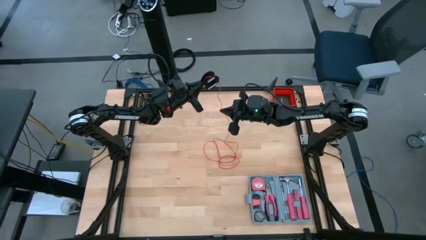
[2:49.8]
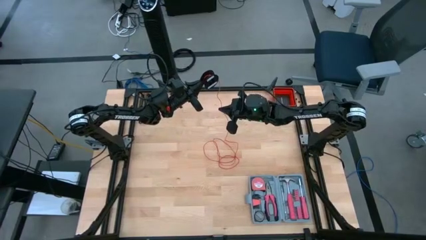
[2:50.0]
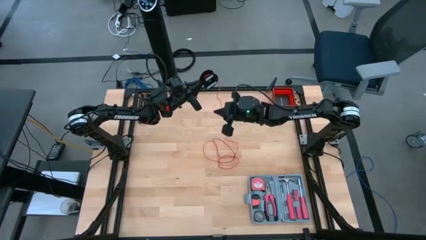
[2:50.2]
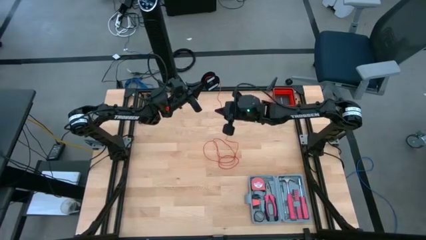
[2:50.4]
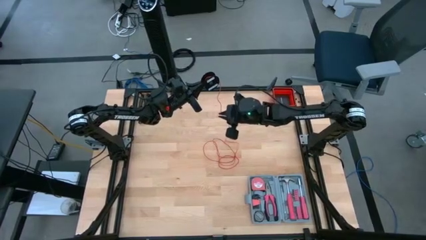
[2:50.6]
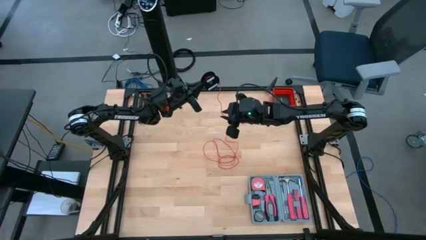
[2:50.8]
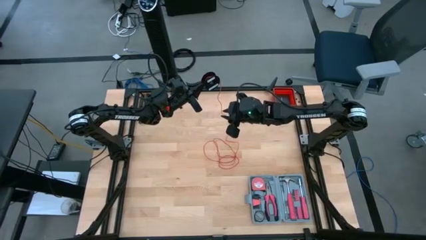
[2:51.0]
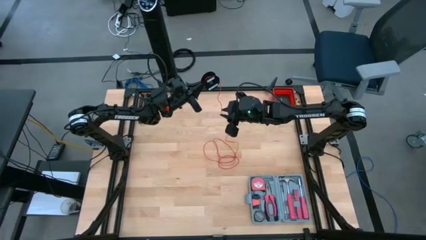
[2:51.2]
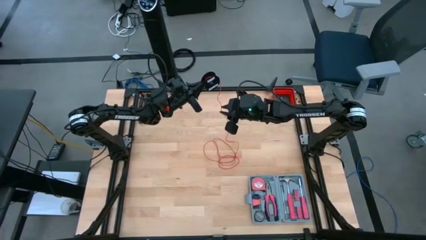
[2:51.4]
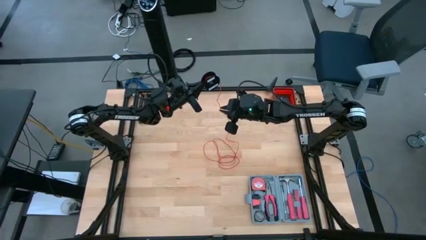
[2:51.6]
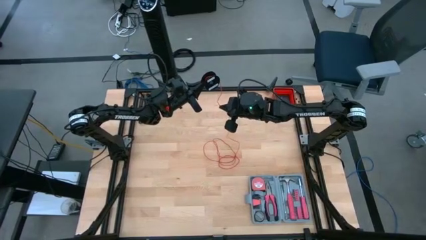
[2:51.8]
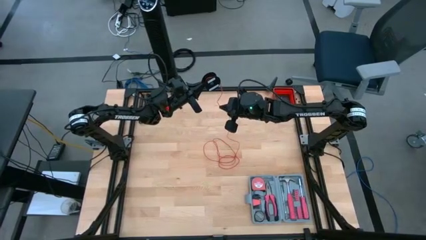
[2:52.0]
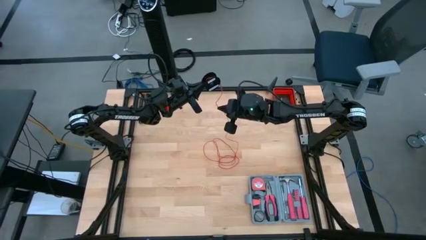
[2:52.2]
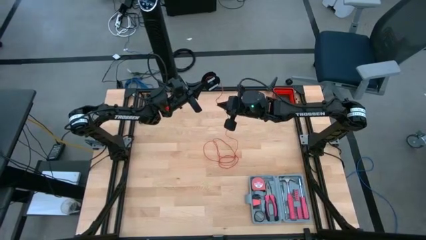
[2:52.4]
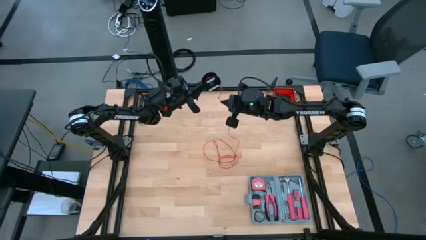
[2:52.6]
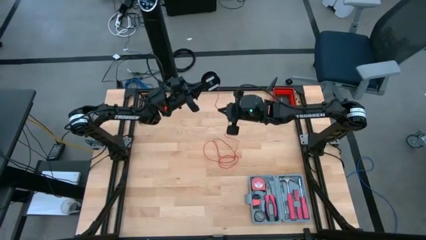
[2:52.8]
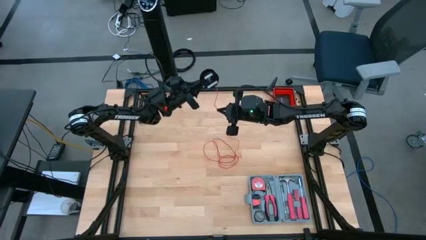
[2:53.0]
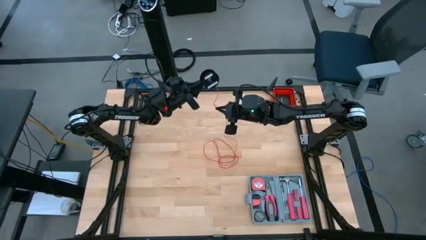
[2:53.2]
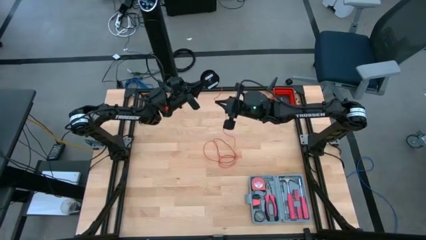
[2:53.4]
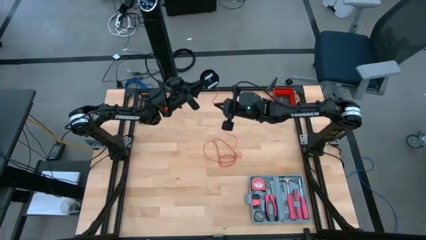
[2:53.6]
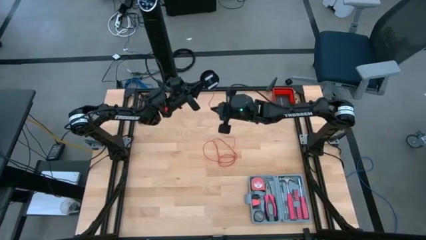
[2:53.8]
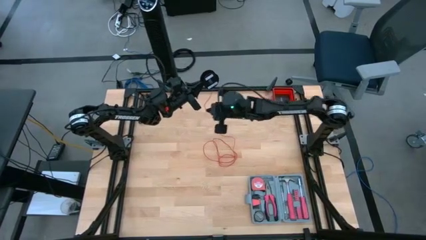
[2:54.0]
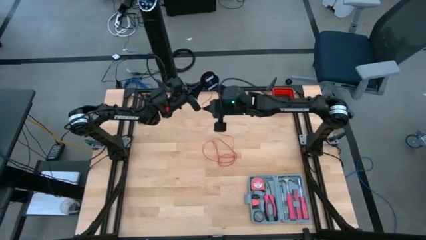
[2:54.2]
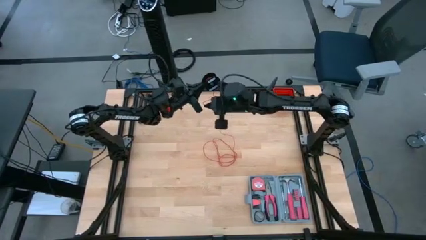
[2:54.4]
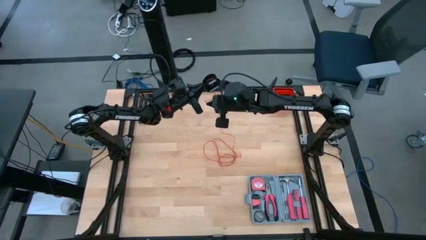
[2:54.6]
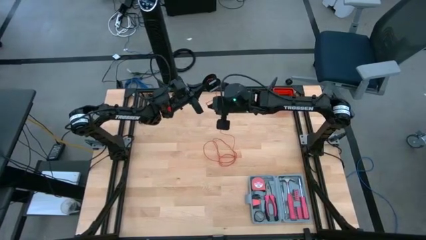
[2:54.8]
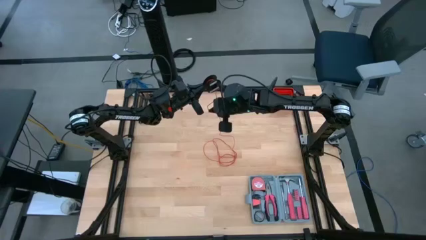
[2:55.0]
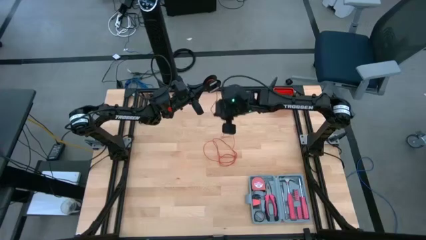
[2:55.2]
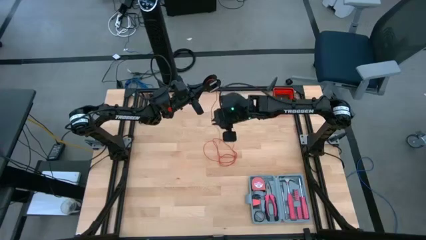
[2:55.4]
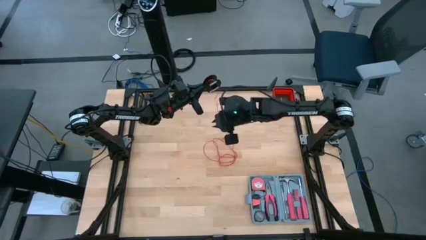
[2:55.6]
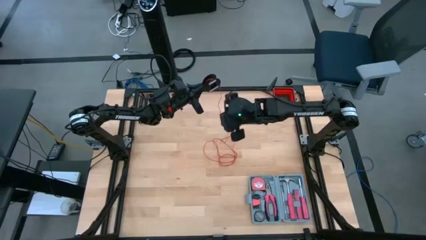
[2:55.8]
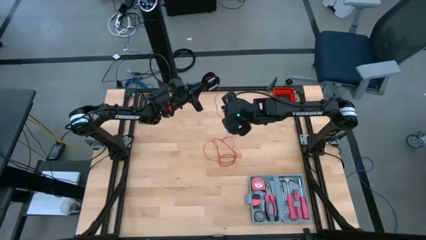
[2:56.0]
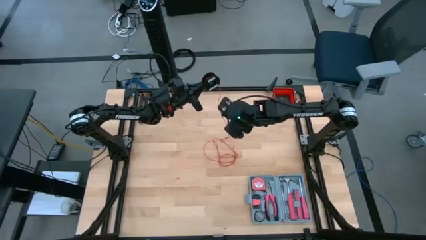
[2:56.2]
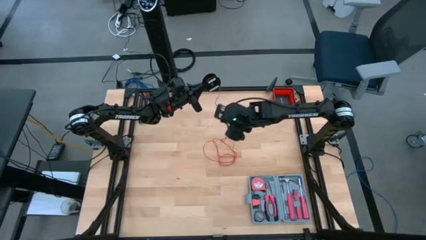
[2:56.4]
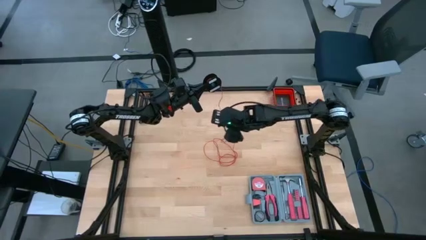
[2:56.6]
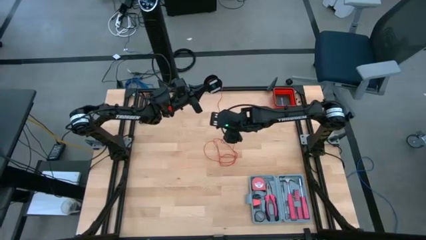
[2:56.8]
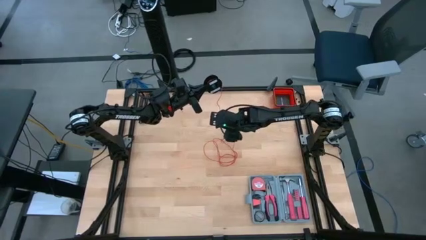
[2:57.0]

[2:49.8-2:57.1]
Task: Coil cords
Coil the wire

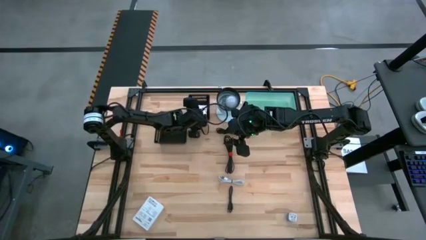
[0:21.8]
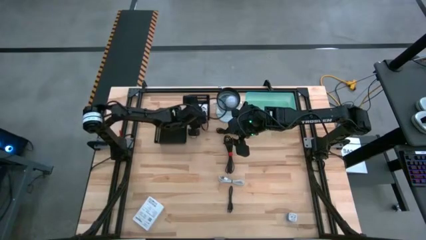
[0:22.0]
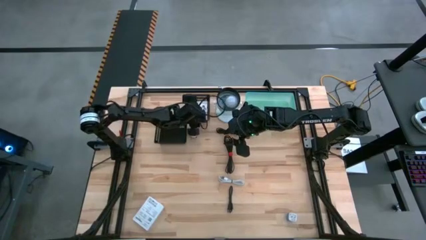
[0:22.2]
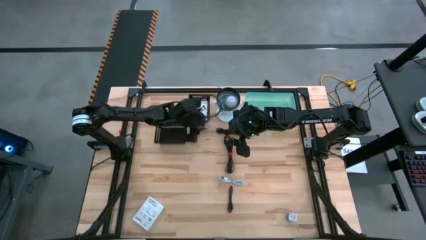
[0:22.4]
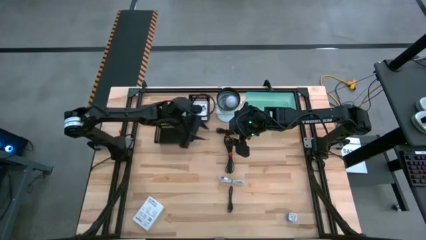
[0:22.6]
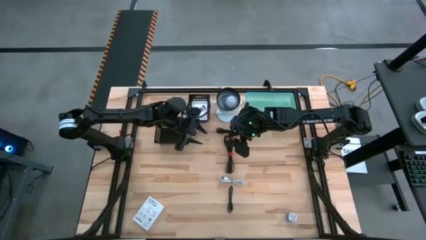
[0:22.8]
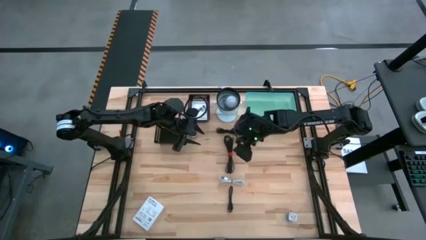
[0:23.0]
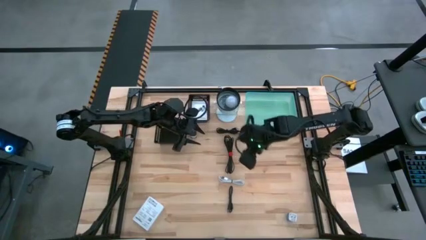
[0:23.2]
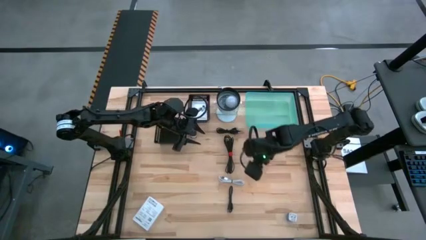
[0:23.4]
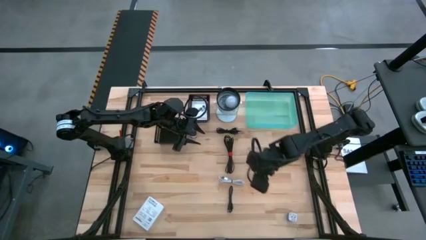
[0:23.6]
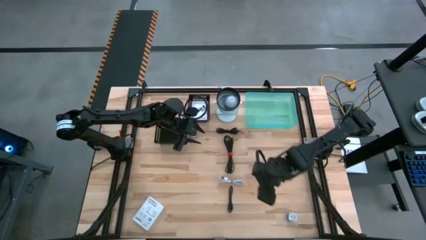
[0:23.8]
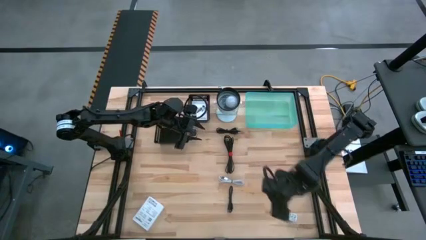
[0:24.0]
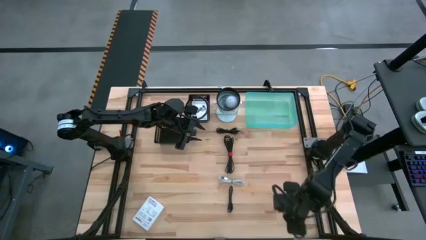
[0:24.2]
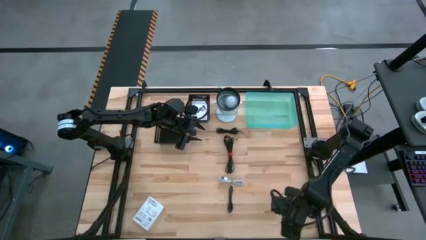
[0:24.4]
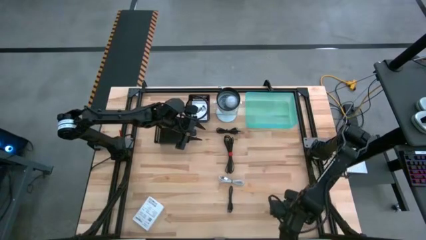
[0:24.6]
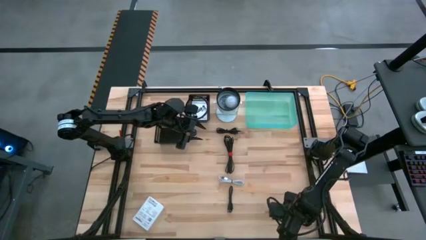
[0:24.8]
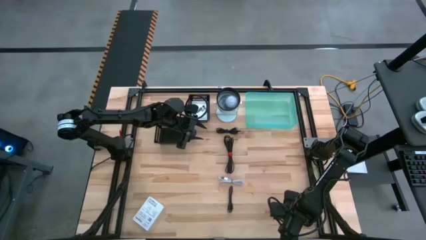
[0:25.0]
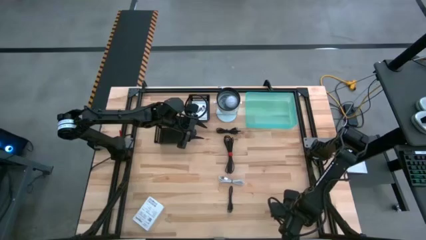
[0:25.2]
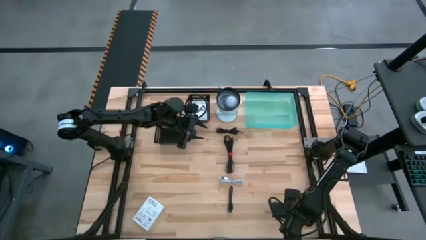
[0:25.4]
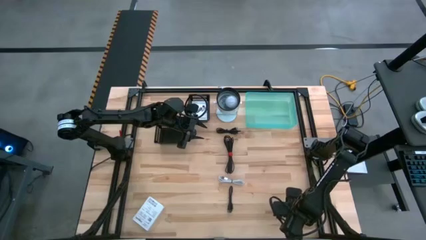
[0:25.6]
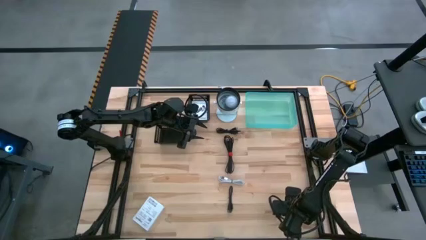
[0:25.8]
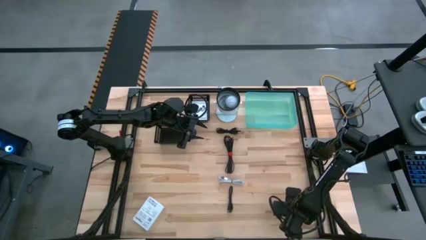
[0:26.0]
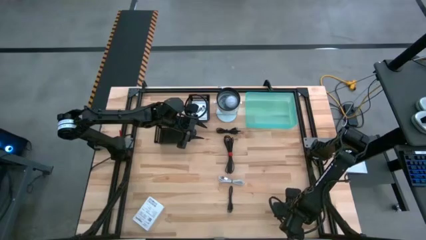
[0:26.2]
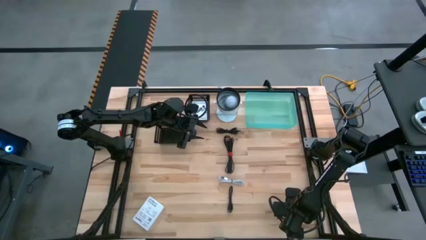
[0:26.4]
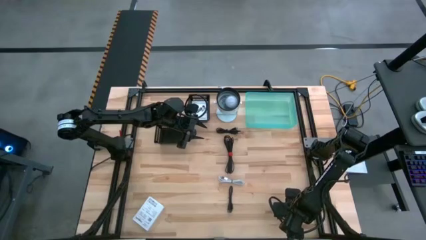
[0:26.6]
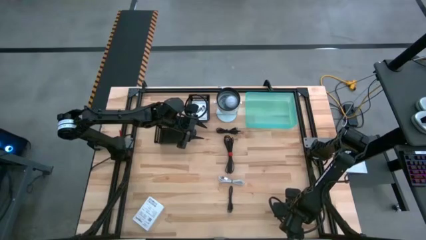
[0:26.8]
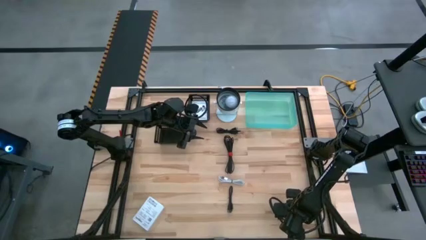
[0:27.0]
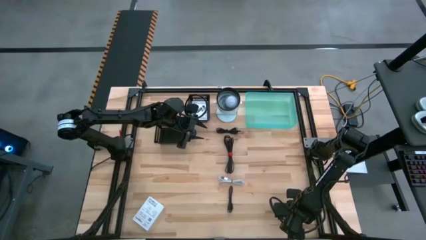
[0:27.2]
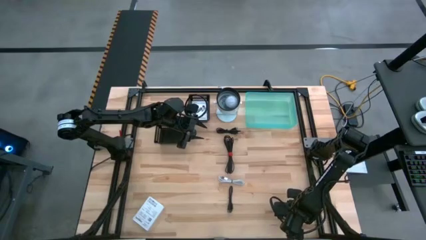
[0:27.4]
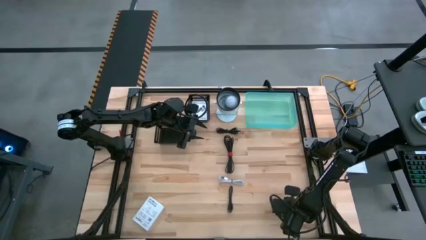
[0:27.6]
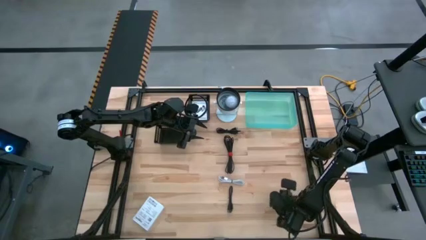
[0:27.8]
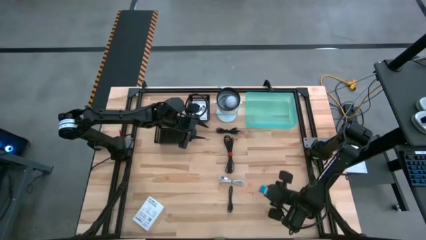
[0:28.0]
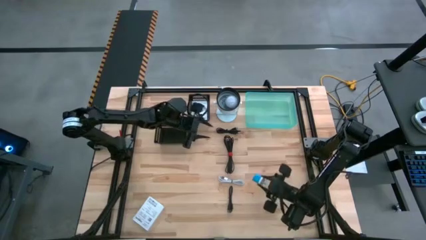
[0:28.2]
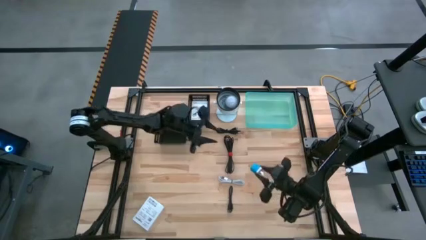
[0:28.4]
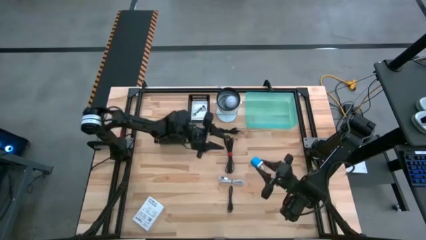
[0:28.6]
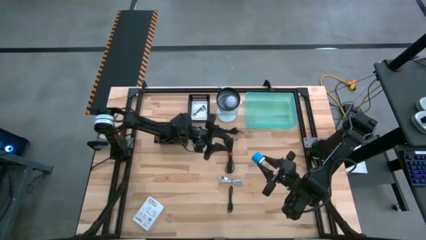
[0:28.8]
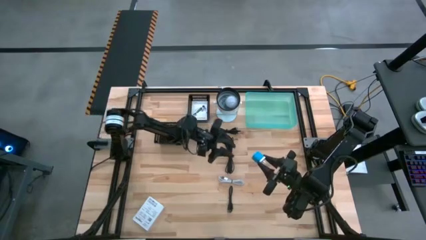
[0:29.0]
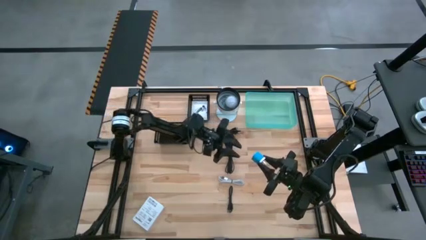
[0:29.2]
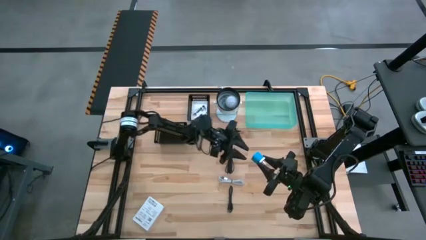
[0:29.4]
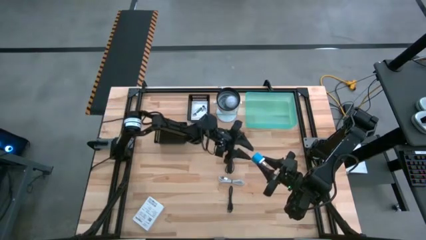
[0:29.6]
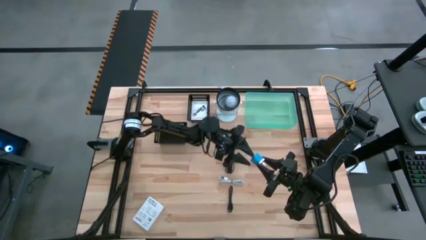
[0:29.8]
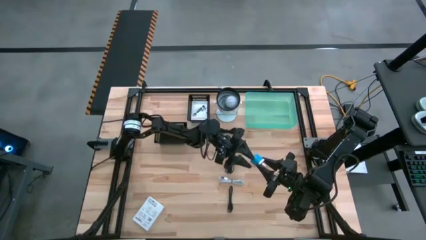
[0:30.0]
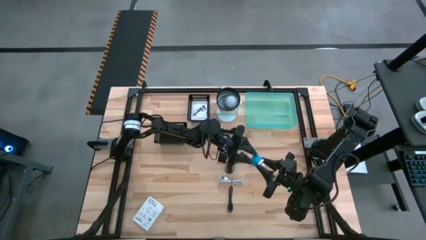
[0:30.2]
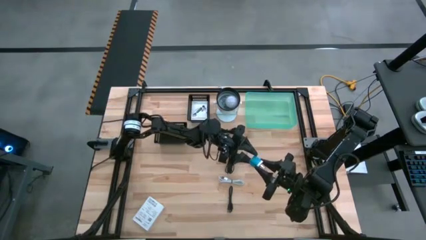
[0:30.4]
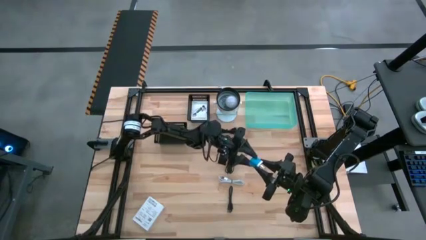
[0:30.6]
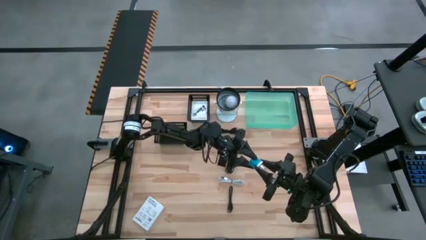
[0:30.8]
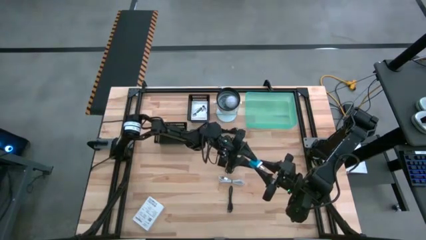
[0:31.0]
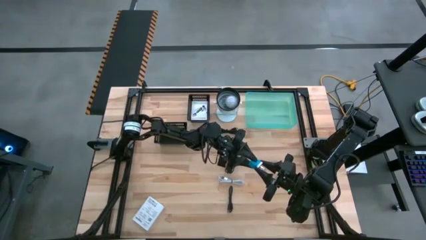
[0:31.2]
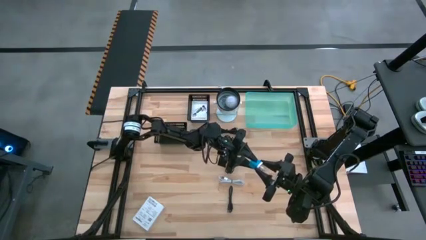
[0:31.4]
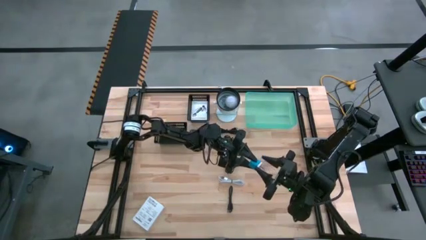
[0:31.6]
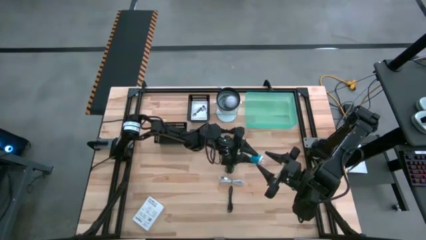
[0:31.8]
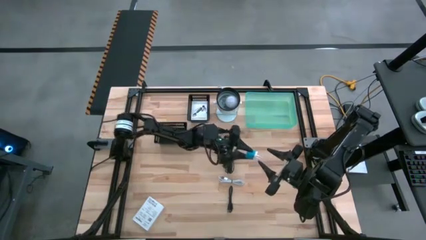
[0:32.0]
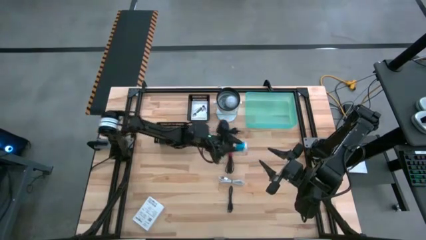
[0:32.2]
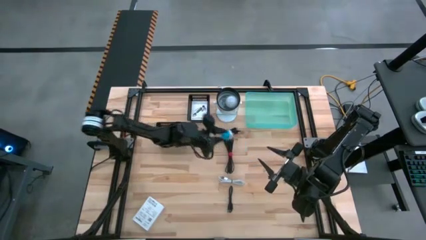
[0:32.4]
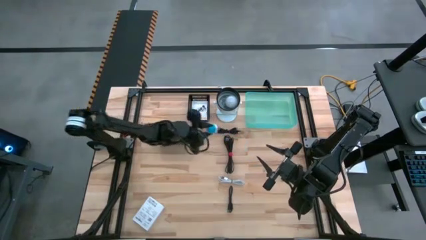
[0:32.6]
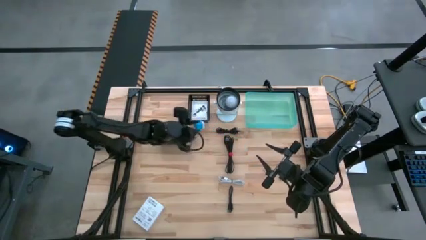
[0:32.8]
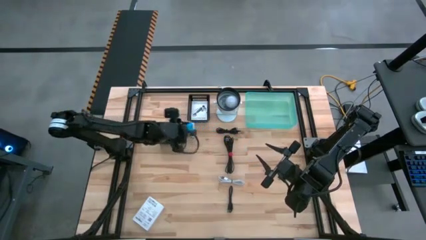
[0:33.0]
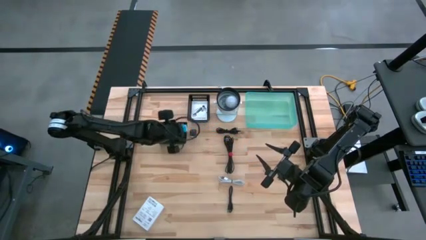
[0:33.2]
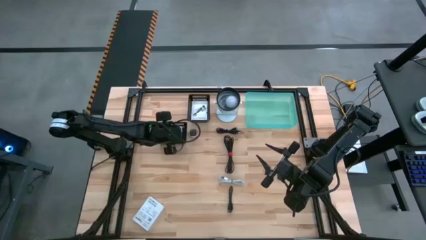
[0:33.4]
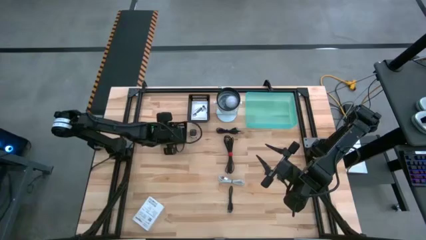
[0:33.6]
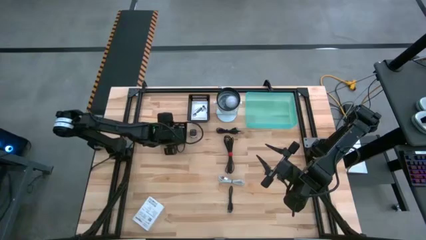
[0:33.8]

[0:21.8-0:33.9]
Task: Pick and place items into bin
Put the light blue adapter into the bottom black bin
